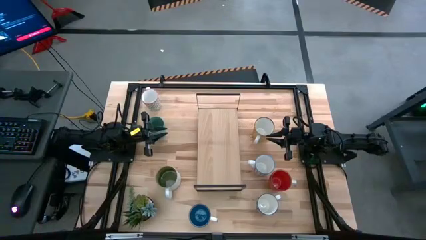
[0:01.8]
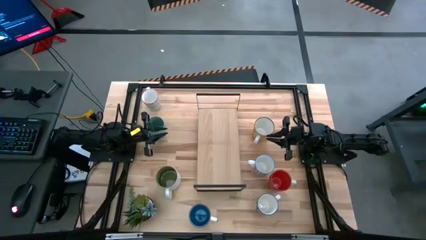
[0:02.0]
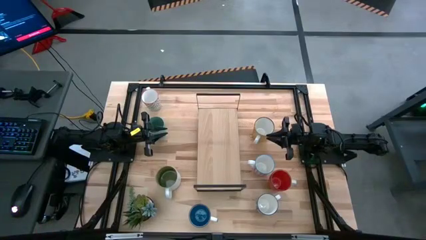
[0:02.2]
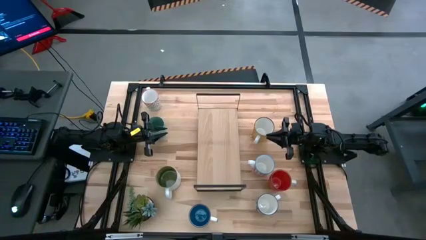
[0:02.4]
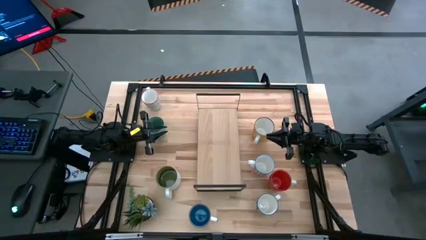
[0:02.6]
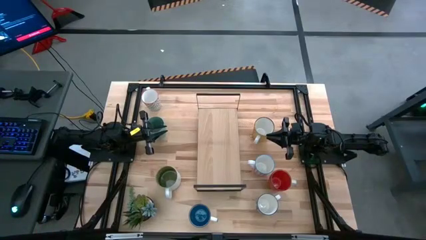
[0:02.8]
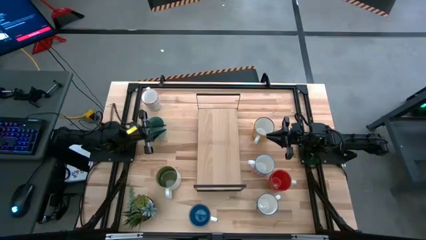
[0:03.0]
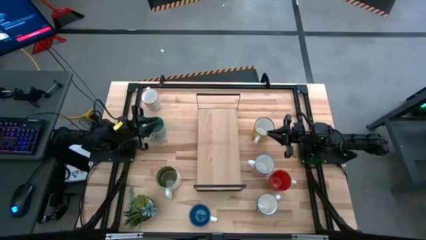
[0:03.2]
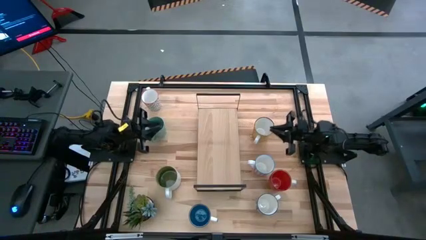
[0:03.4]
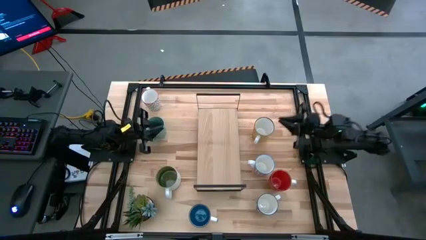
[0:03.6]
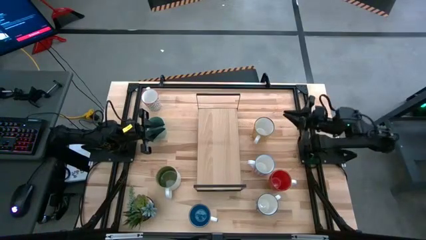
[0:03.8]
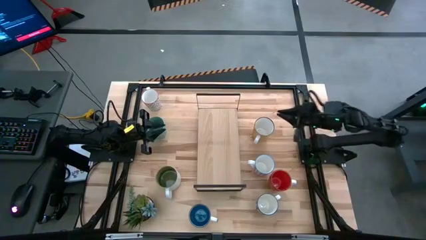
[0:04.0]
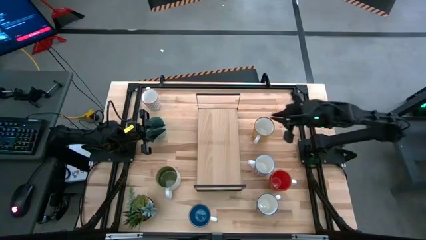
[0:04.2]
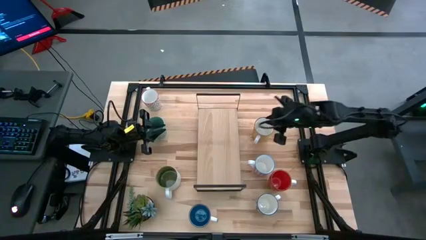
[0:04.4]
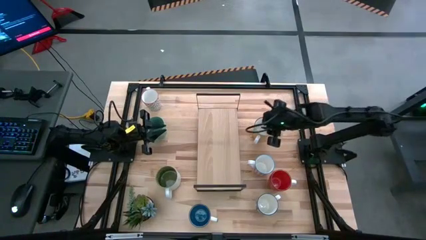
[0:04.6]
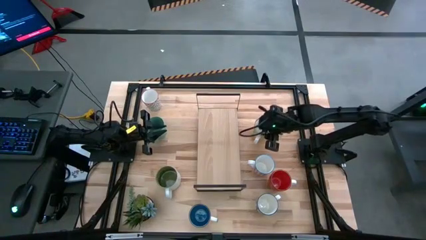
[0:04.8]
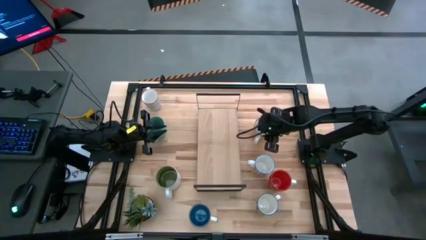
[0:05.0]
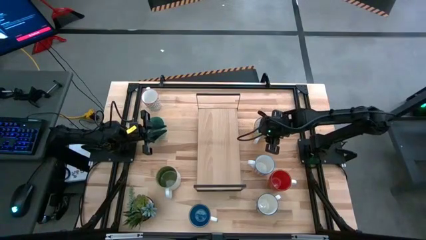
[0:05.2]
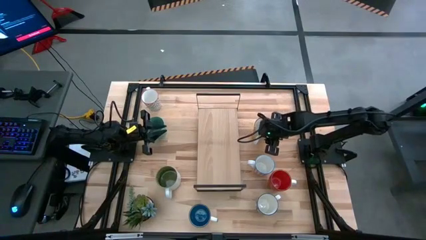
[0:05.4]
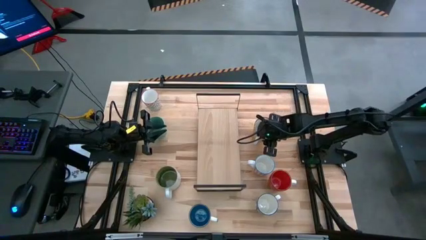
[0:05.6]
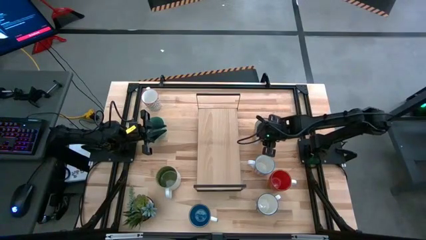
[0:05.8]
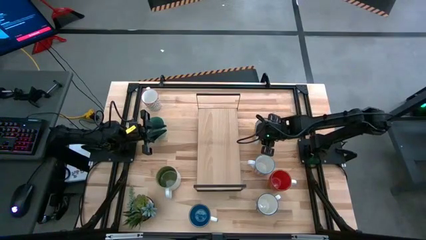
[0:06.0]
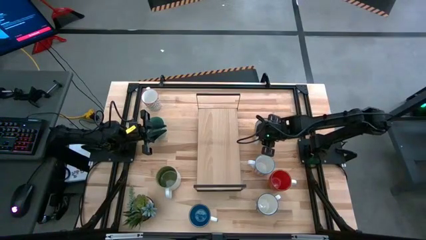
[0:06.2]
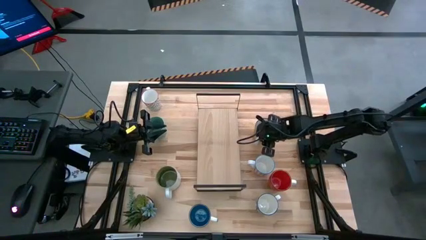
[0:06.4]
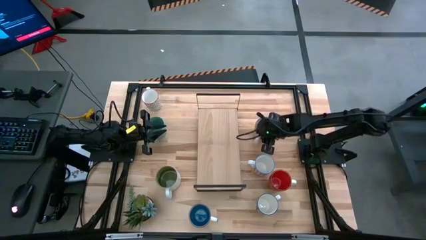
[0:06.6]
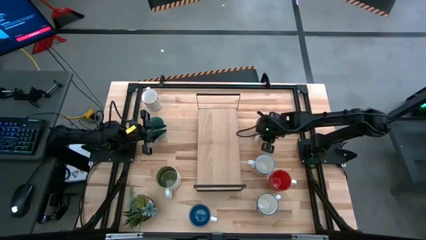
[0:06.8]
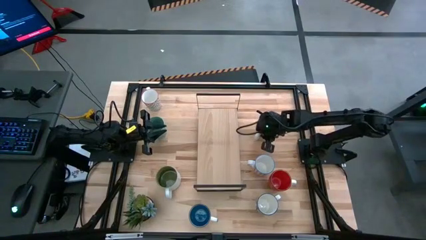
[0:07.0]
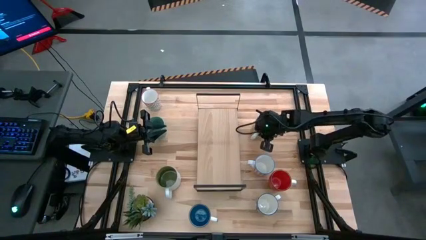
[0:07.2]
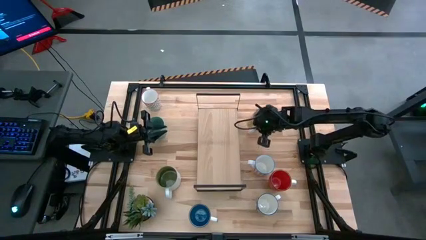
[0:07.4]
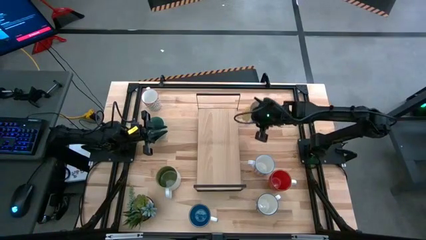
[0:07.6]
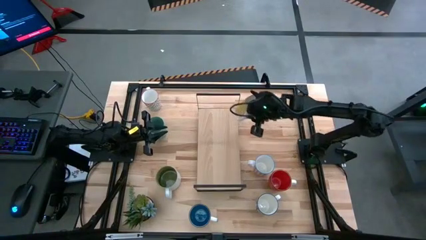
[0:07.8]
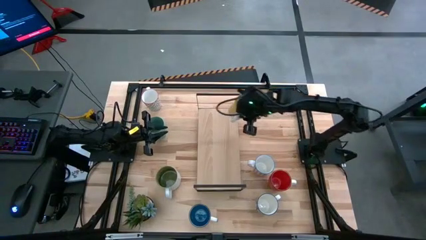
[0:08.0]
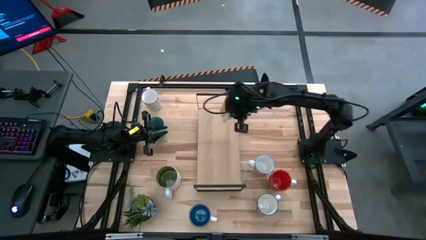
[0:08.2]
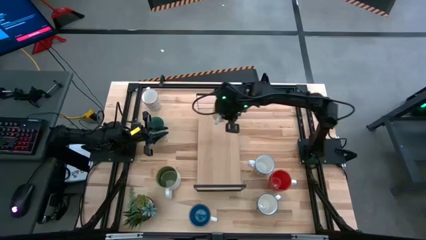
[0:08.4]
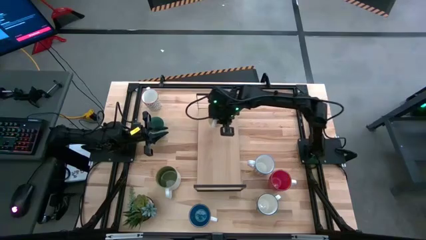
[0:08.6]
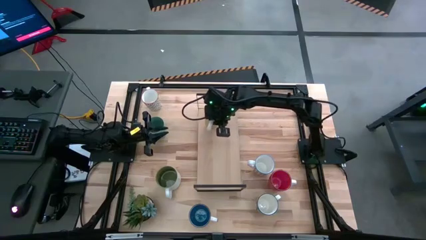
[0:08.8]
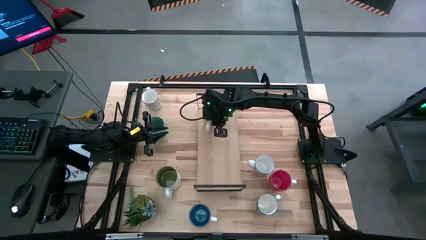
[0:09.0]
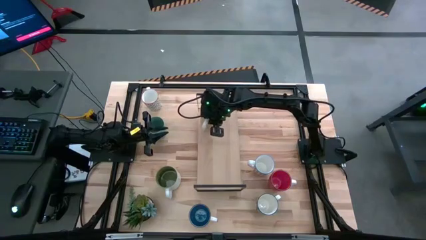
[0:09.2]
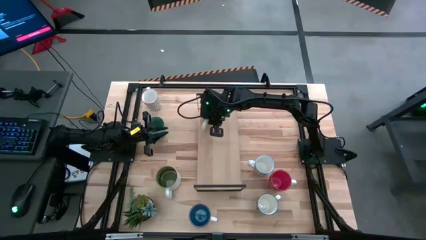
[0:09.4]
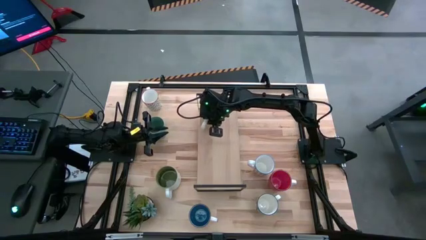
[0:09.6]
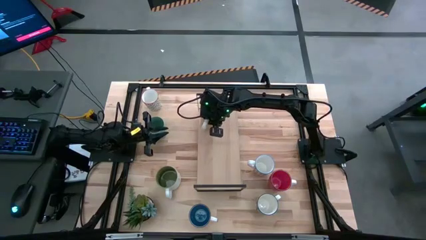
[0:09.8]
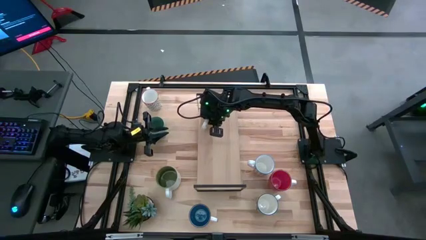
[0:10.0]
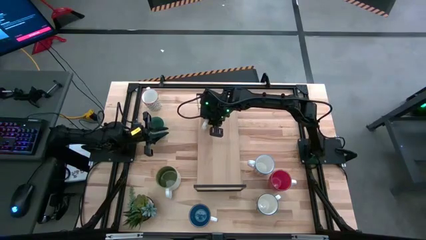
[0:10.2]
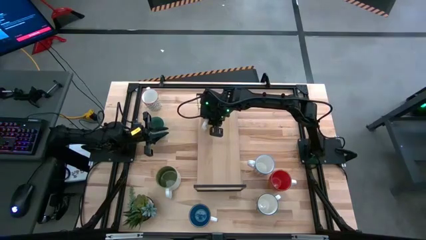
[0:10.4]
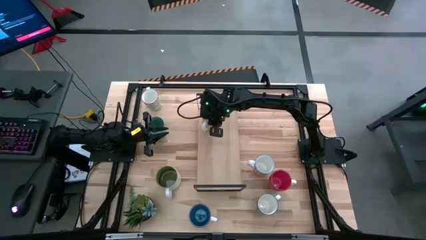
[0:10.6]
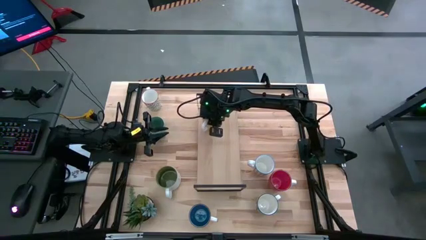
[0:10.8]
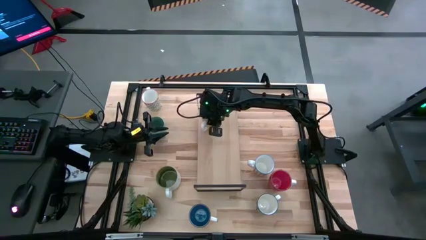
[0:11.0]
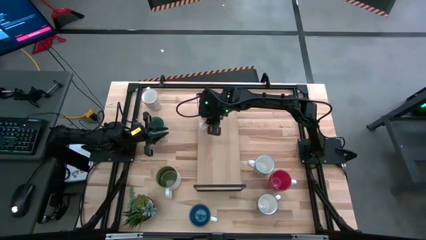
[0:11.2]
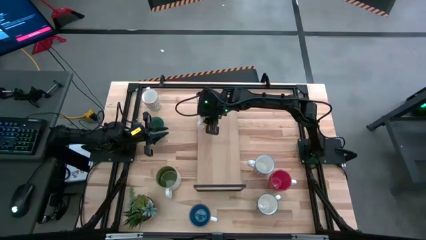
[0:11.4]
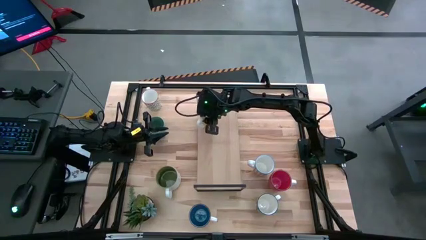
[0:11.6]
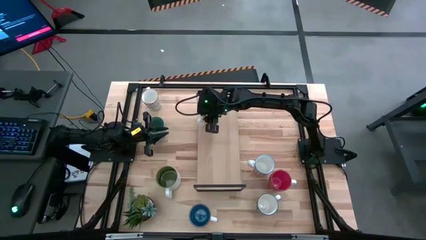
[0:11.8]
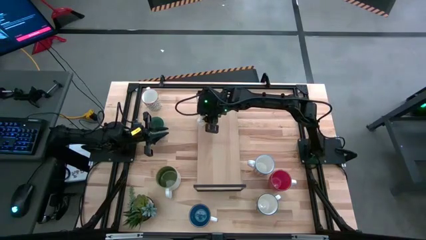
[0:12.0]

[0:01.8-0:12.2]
Task: Place coffee mugs
Put the yellow mug on the shelf
